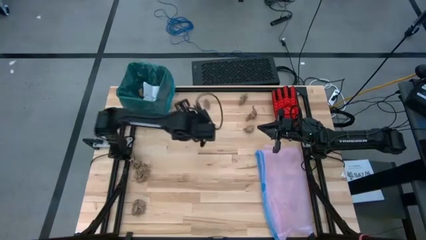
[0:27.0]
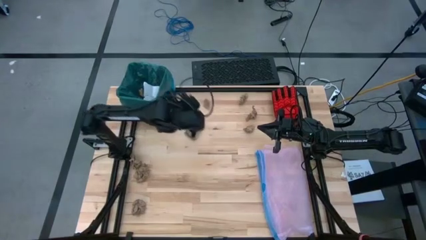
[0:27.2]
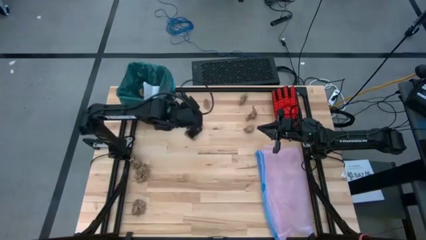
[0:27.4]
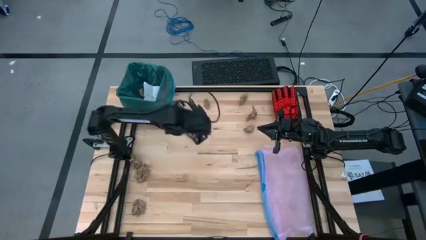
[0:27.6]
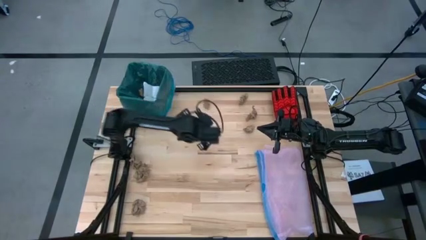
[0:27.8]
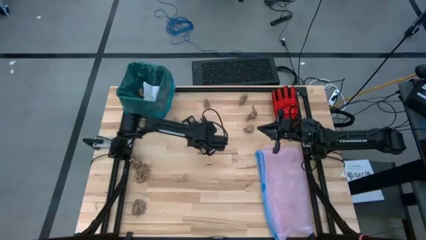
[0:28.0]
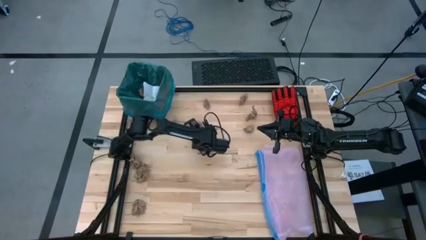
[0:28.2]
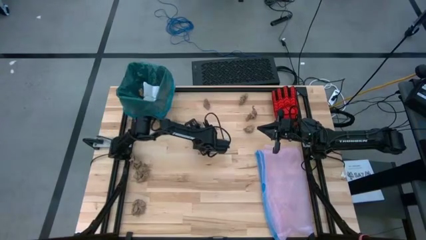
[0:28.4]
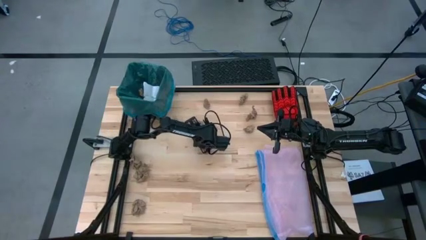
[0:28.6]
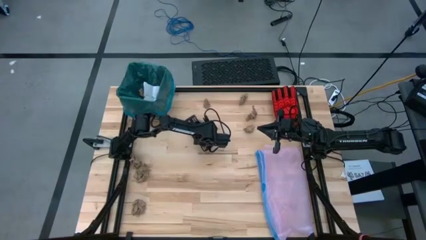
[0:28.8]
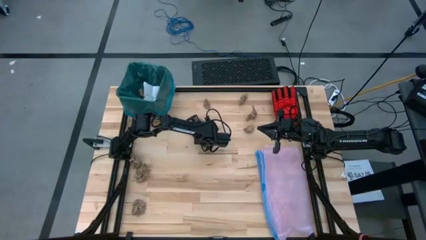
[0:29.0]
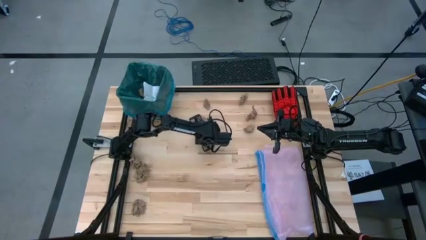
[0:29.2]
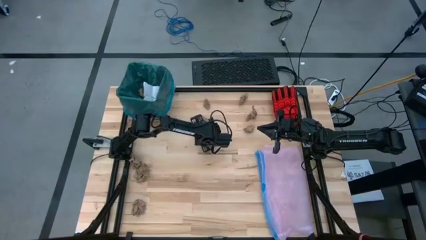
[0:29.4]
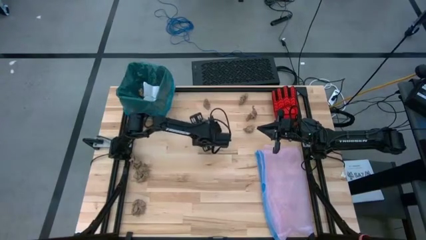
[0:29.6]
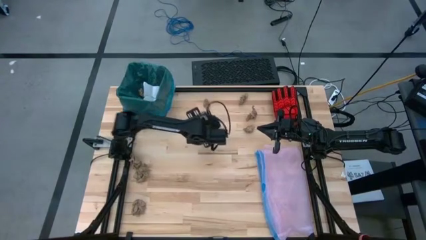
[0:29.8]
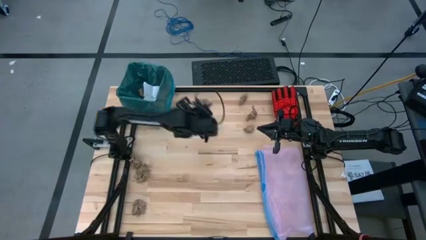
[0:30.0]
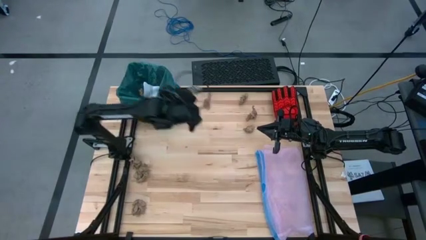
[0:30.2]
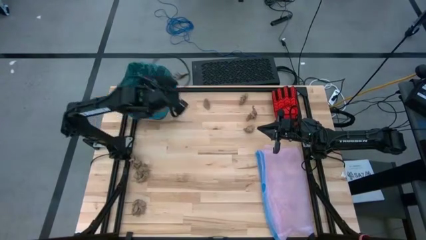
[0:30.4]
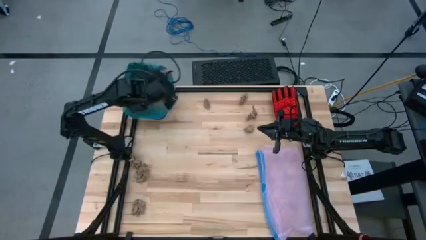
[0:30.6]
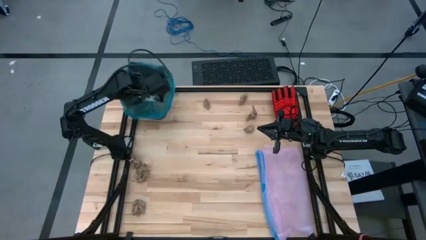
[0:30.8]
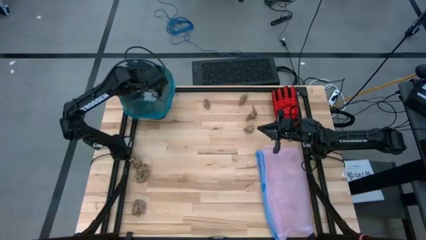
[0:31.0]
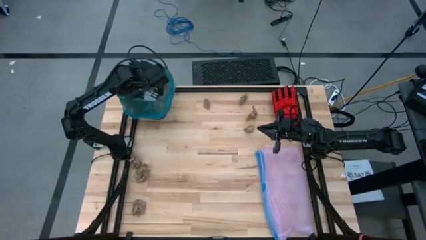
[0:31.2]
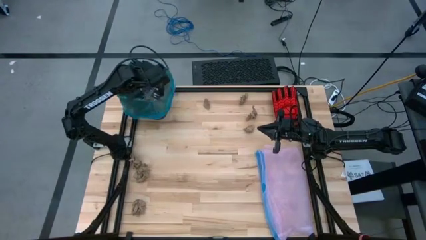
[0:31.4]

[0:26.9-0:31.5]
Task: place trash/remove bag and relplace
Put the brown paper into the black trash bin

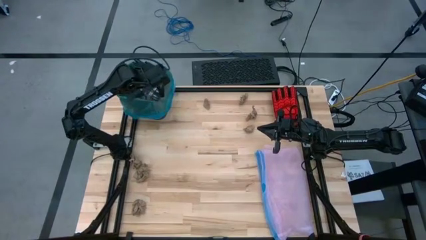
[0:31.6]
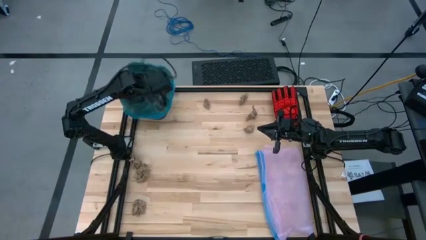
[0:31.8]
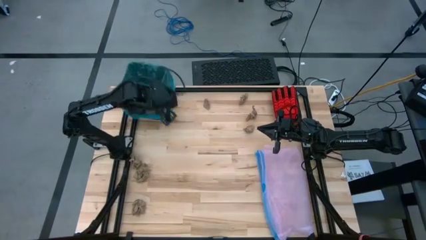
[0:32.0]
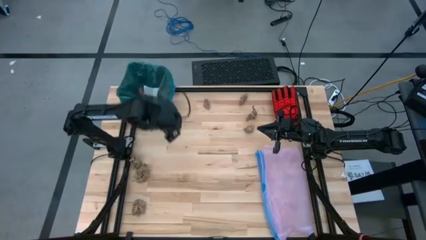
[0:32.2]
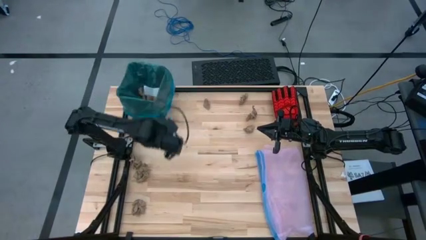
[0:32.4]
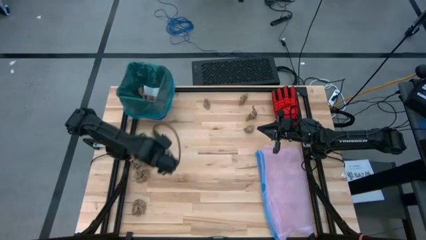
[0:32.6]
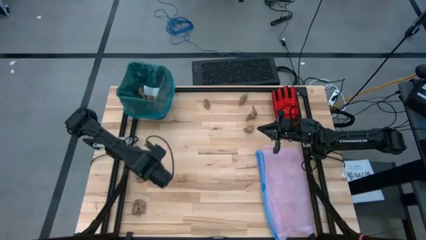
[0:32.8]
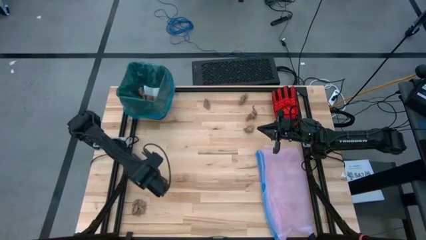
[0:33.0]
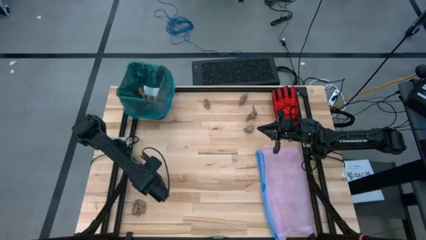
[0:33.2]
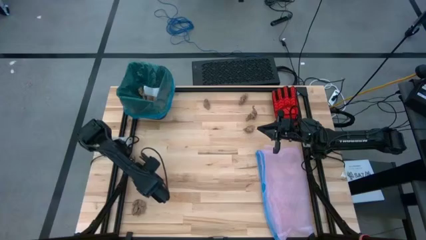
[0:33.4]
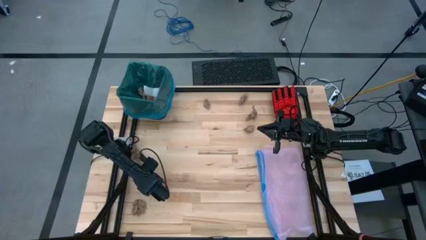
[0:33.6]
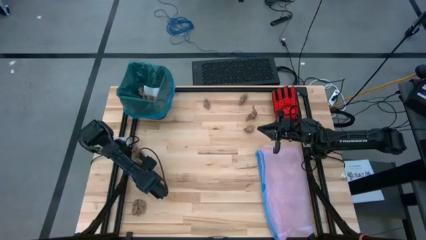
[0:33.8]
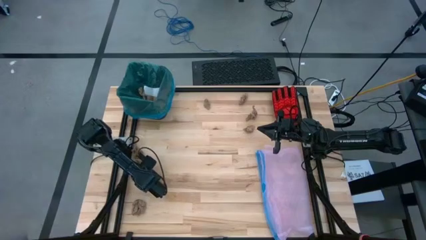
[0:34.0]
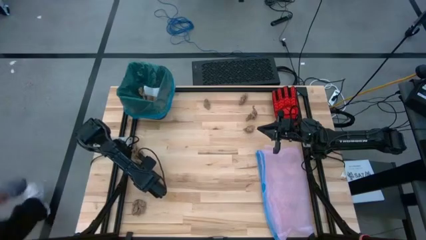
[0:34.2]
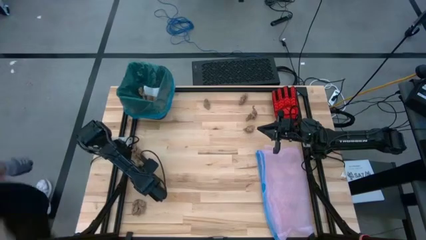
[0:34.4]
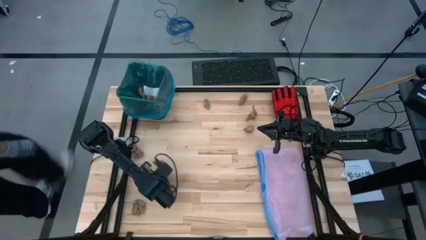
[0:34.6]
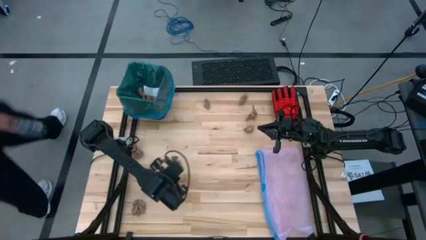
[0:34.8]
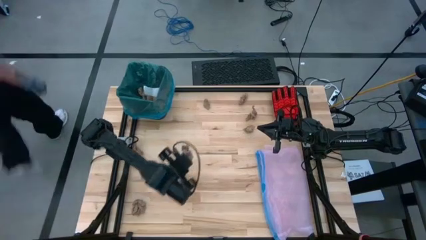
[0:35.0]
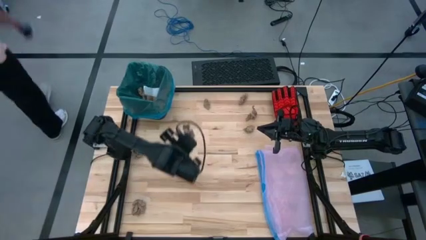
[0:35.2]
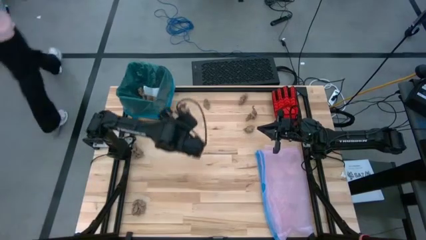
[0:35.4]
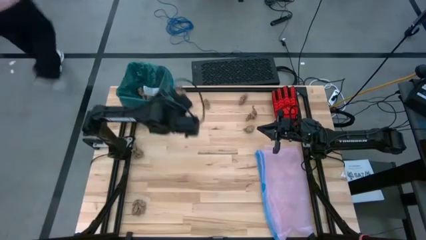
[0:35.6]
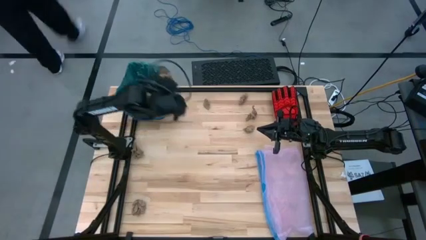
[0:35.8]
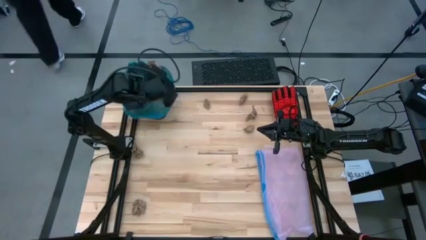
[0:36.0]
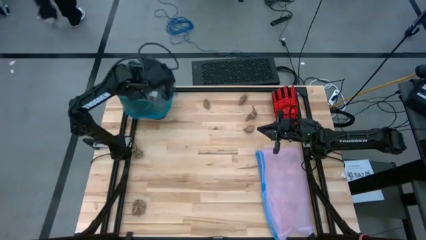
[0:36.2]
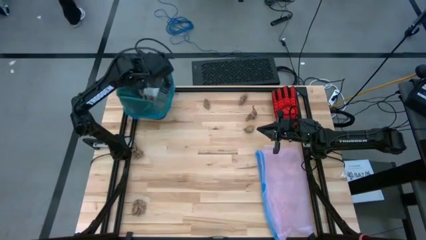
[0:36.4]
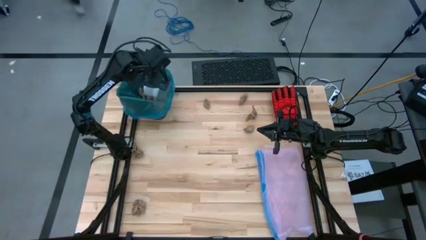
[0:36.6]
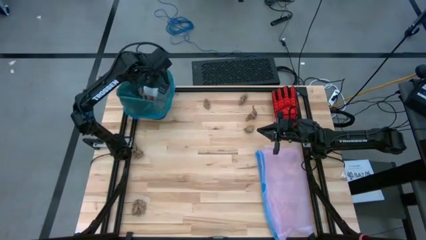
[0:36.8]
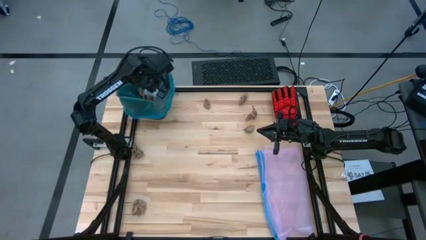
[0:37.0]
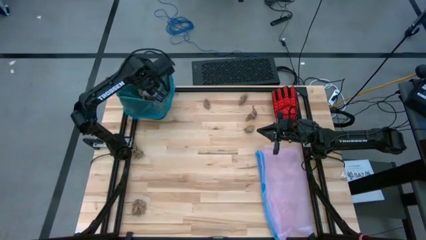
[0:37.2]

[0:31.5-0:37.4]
Put the brown napkin into the black trash bin

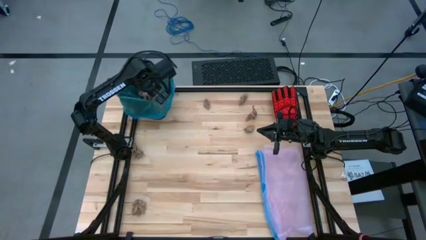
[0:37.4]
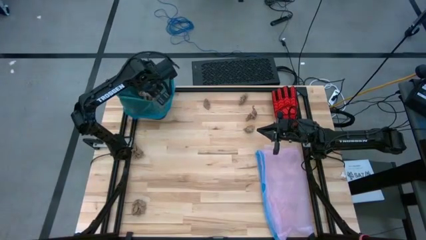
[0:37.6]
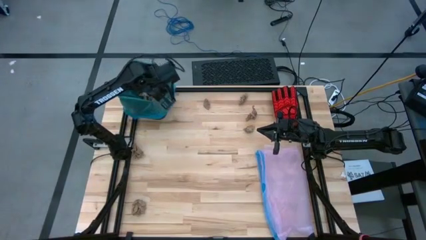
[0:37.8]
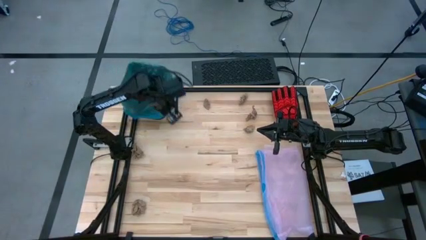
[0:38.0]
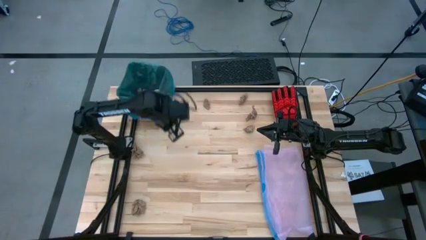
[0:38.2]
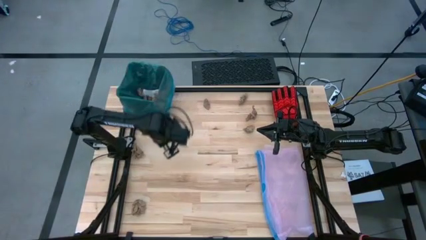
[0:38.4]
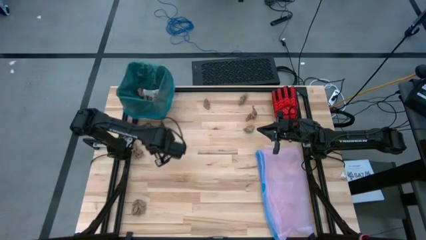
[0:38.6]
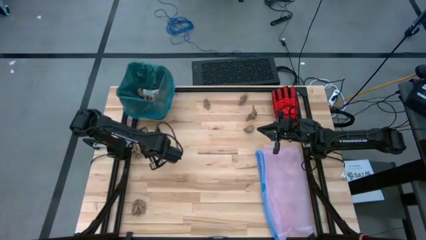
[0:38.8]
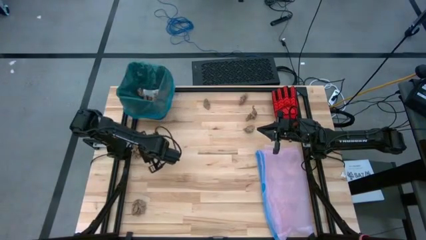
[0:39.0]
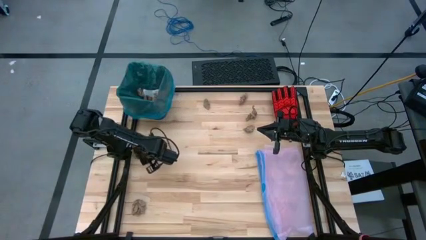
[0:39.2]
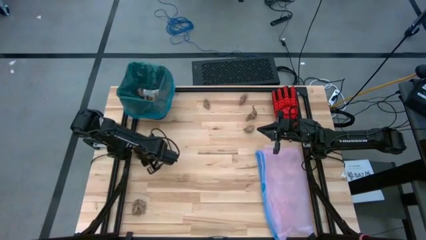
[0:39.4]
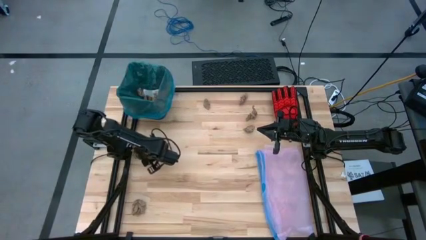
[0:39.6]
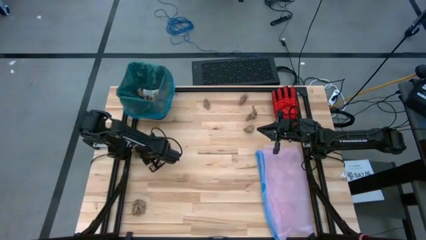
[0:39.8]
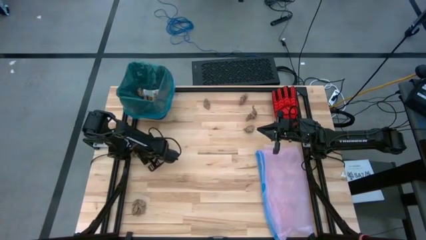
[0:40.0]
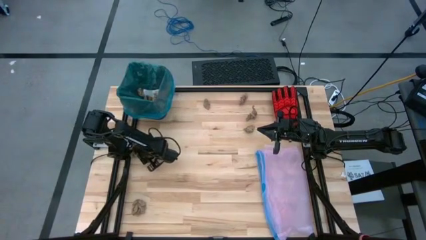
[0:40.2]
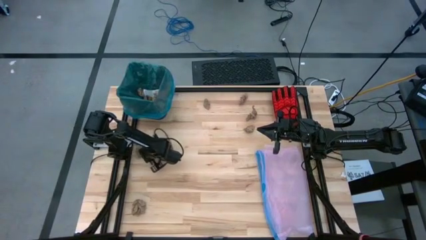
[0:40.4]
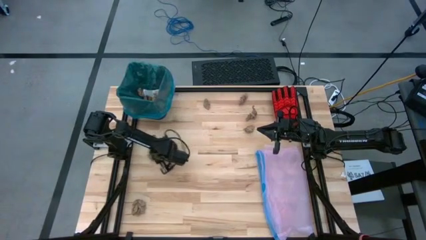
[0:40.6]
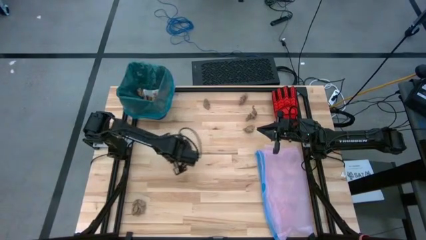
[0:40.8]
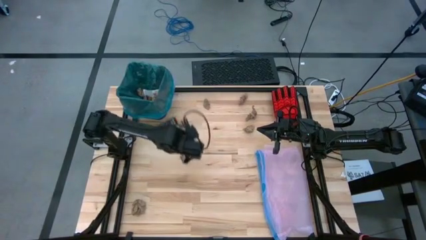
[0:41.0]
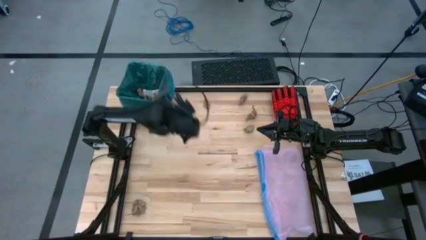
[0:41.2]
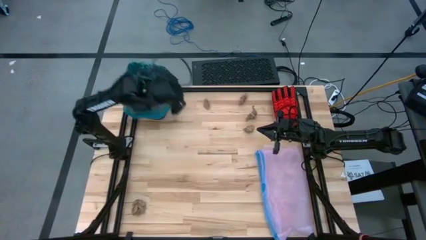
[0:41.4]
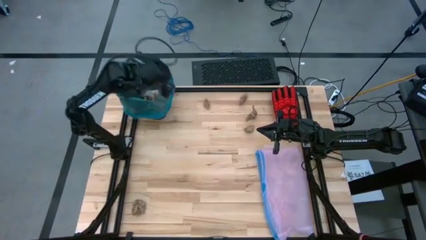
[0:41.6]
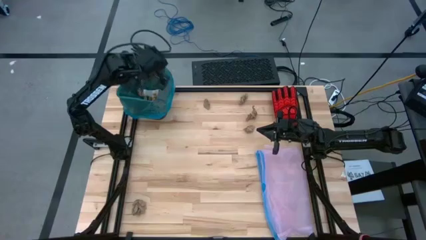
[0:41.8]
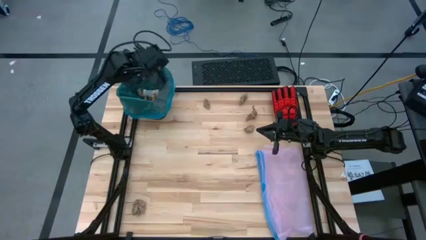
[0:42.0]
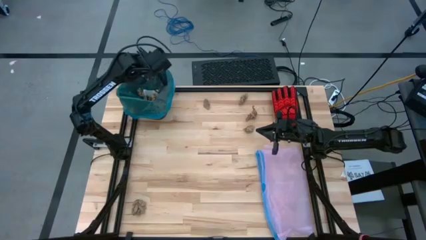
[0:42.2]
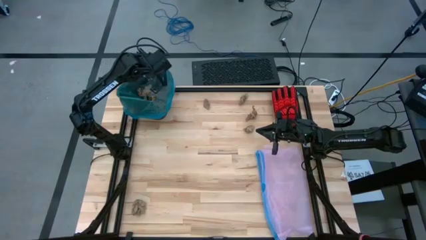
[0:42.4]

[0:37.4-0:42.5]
Put the brown napkin into the black trash bin

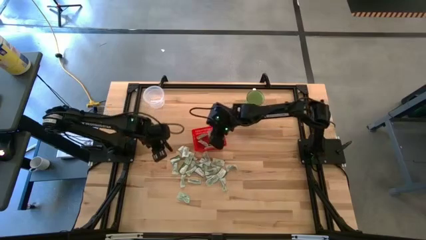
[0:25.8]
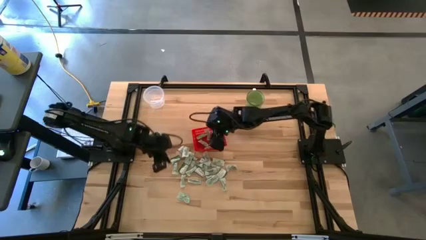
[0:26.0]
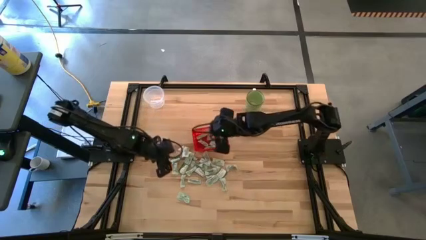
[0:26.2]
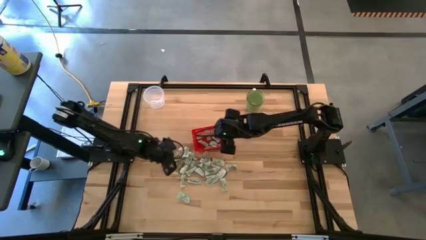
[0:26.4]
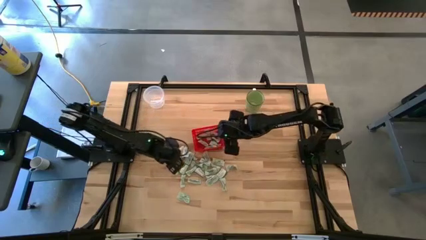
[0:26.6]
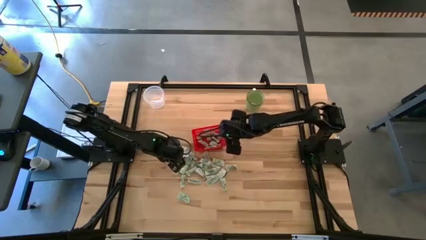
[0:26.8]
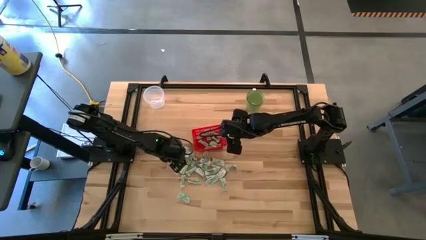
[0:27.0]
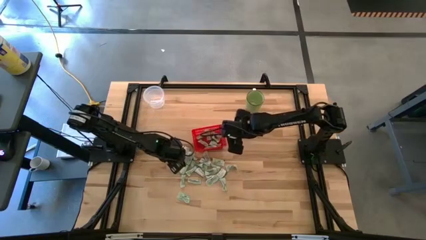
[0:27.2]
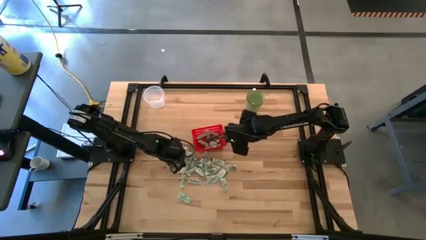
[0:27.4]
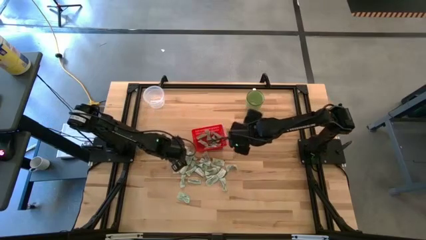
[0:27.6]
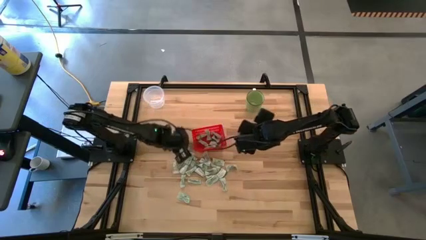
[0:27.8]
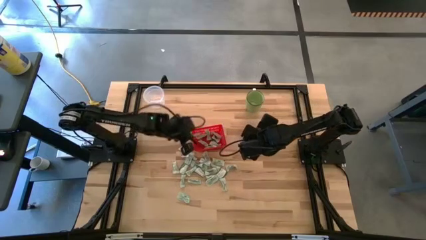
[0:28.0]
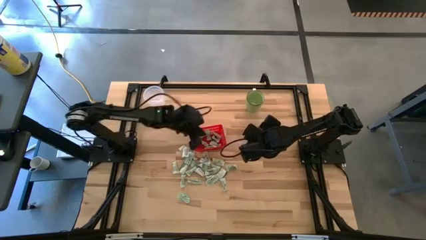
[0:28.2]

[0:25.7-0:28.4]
Task: Pick and place Stevia / Truvia into bins
Put the truvia packet into the red basket
